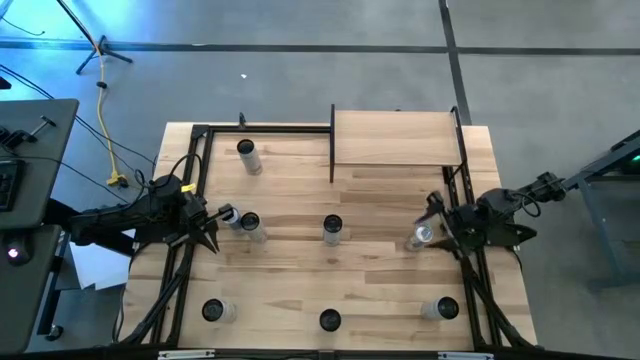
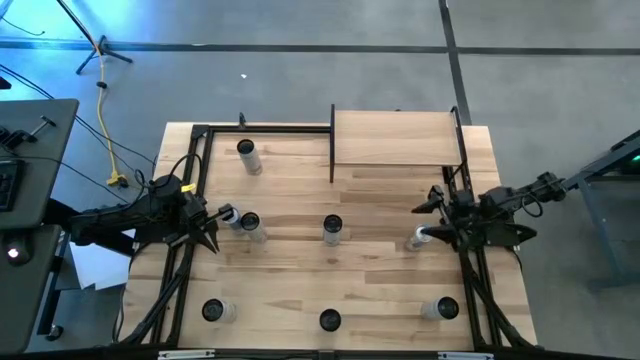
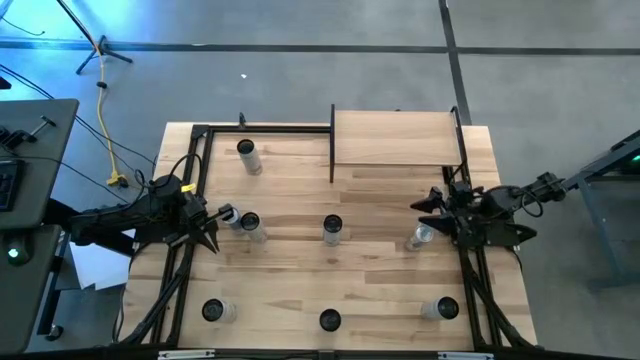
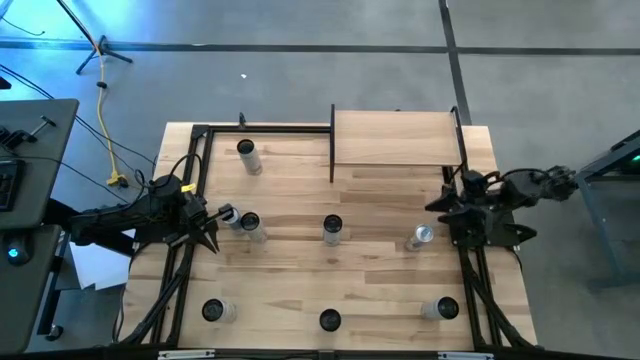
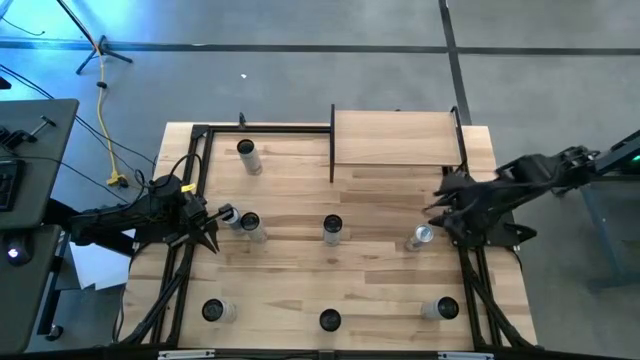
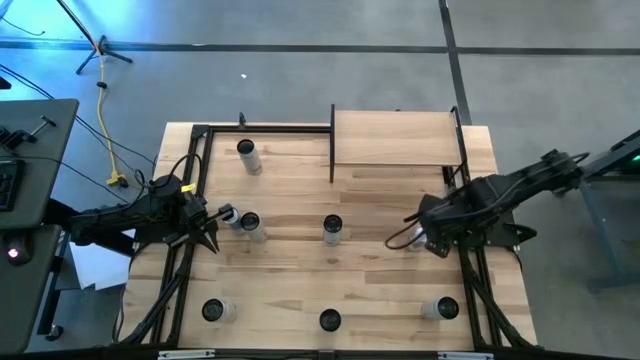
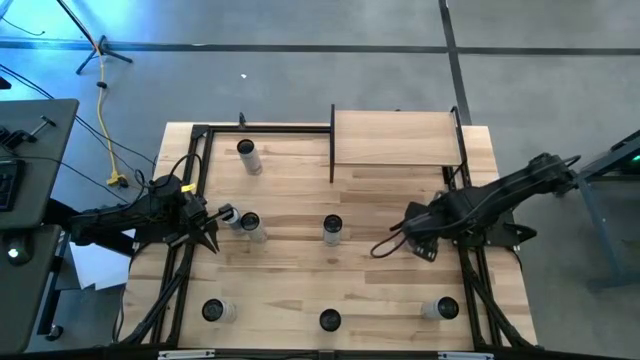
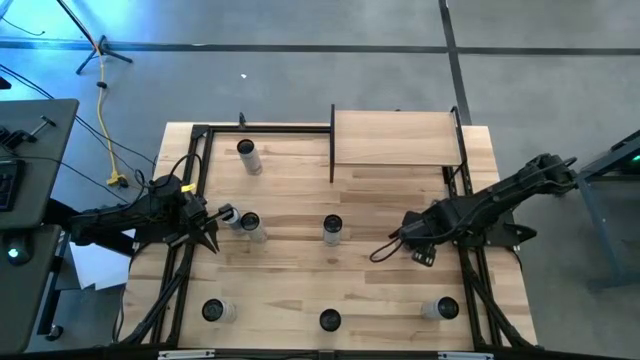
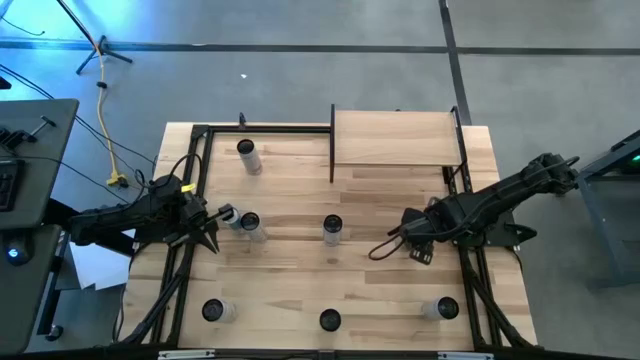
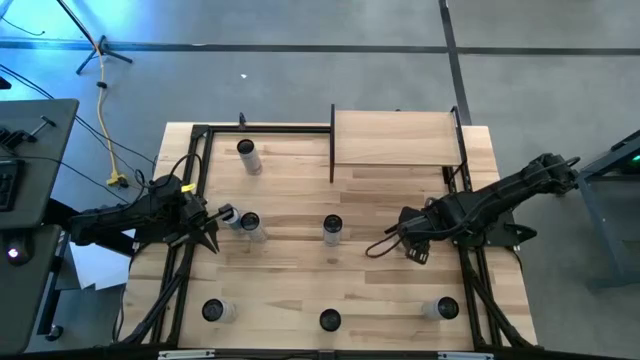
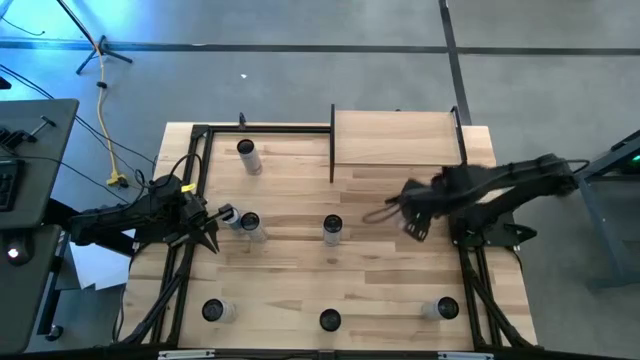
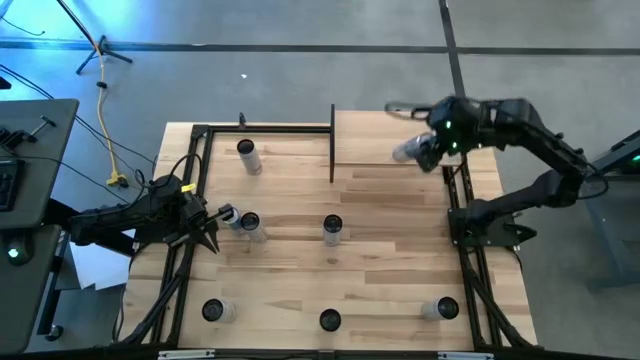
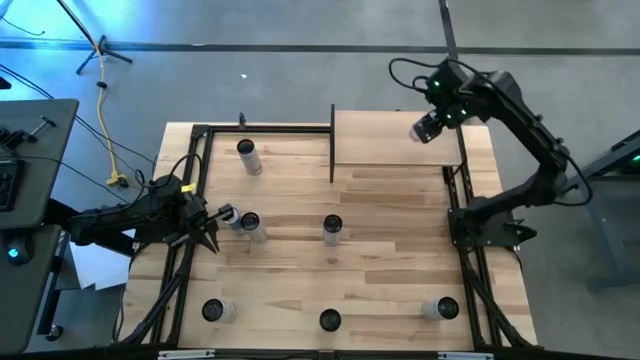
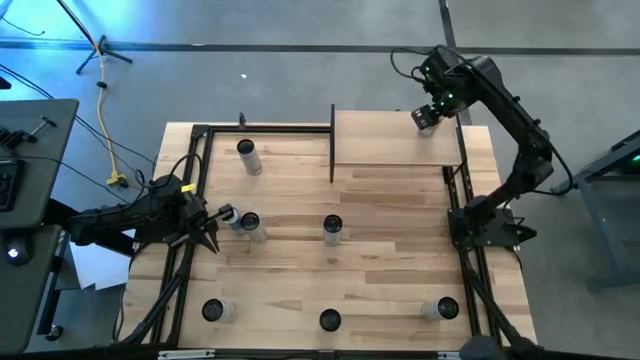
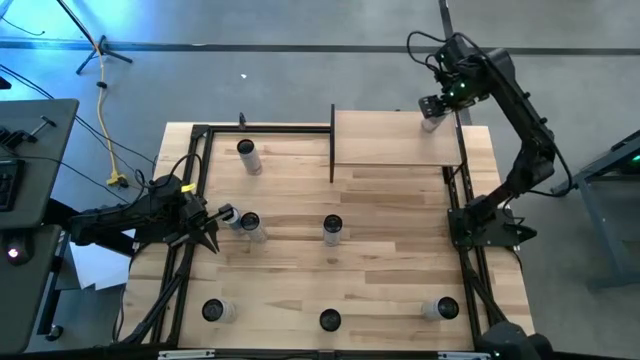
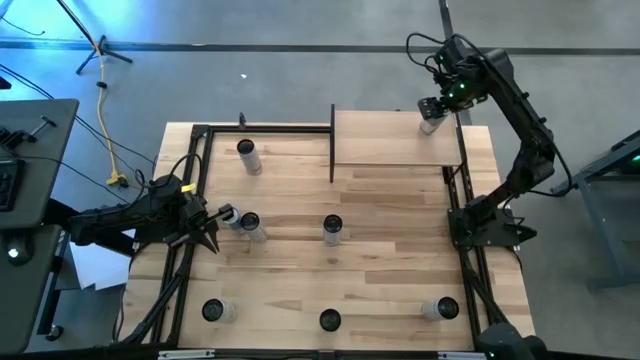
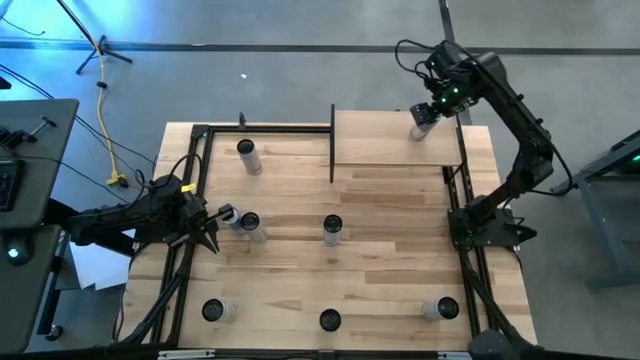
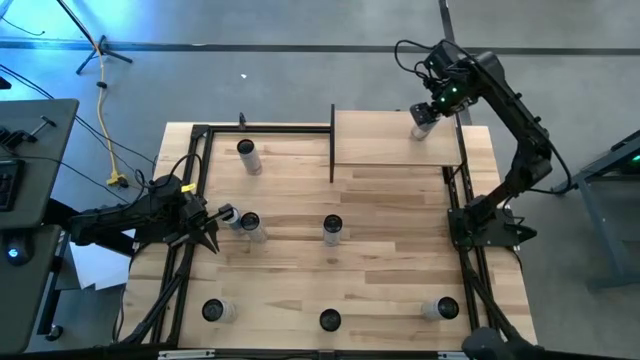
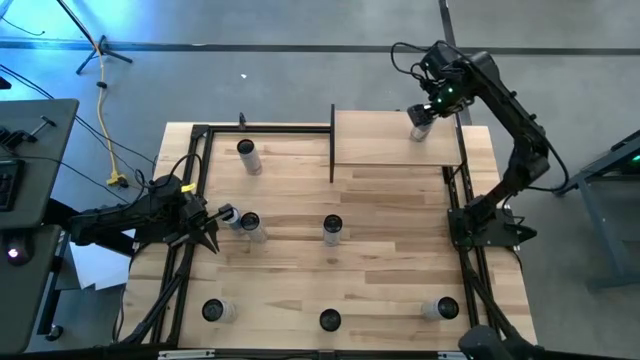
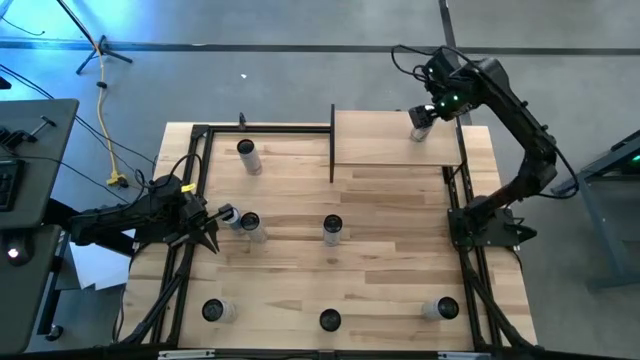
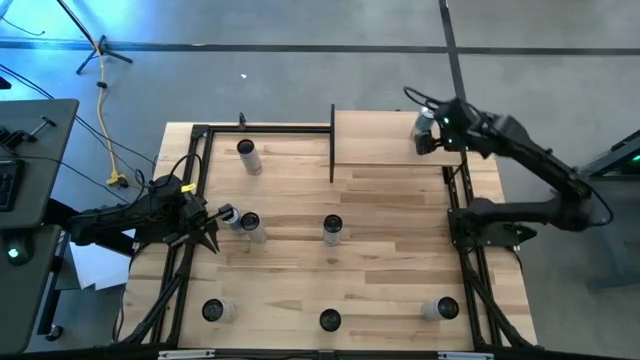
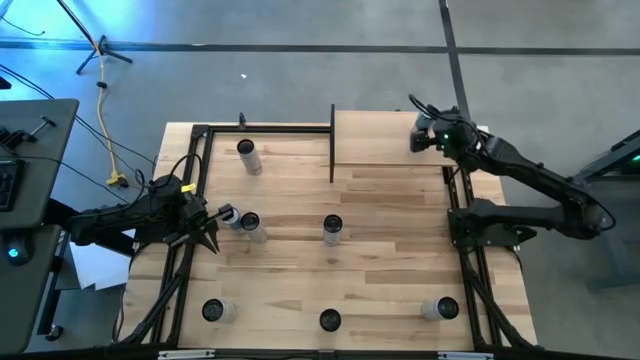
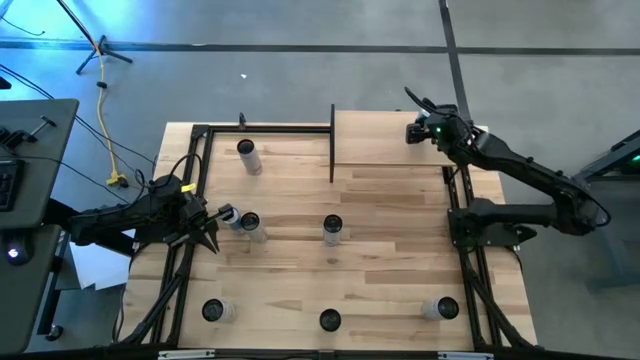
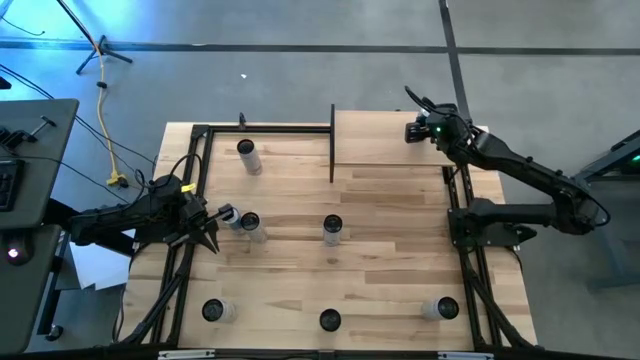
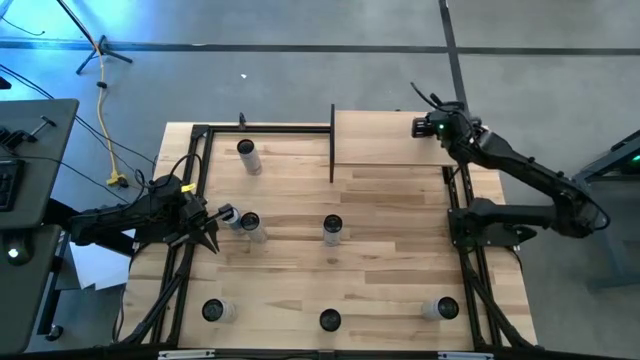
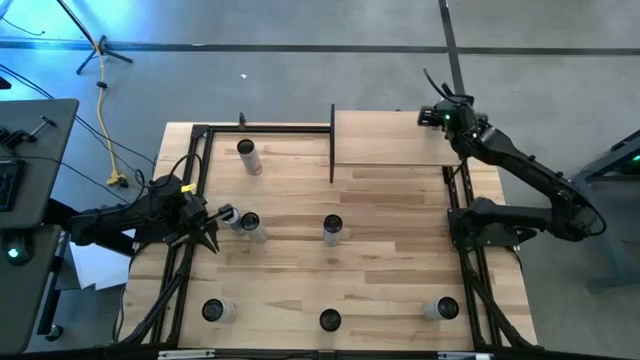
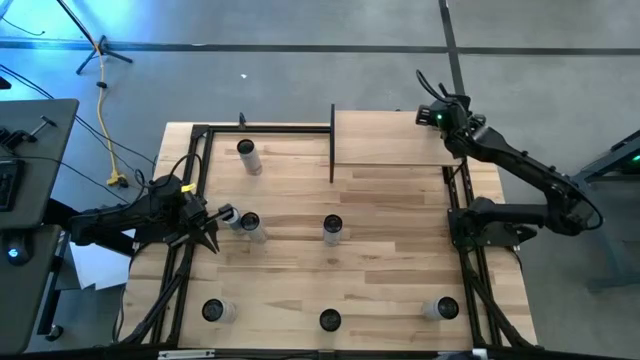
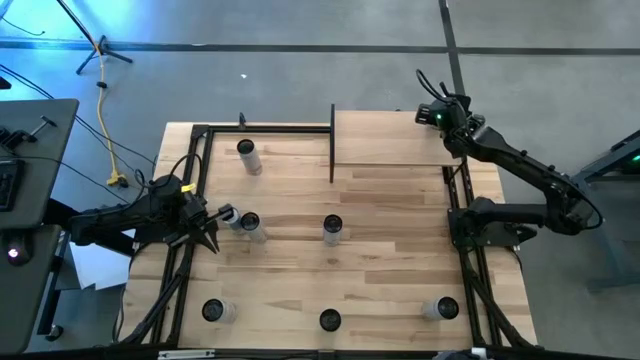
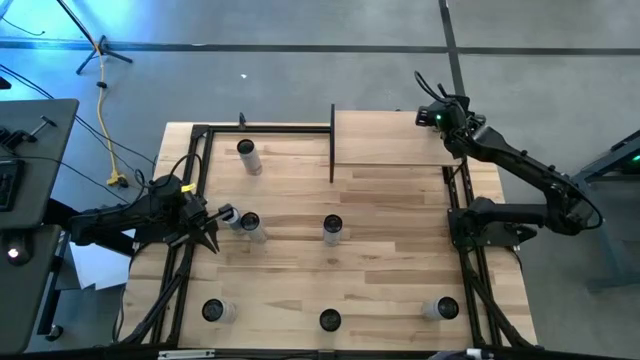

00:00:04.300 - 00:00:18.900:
Task: Place canned beverage on shelf
Put the right blue soda can on the shelf

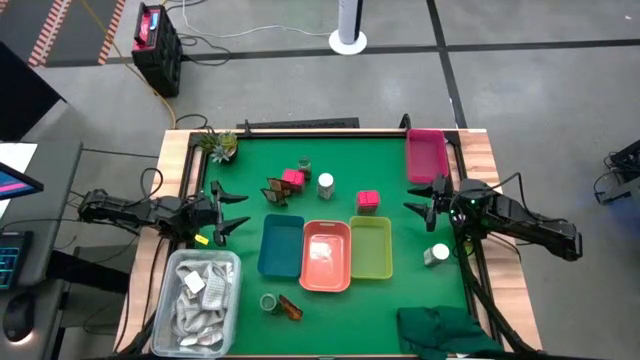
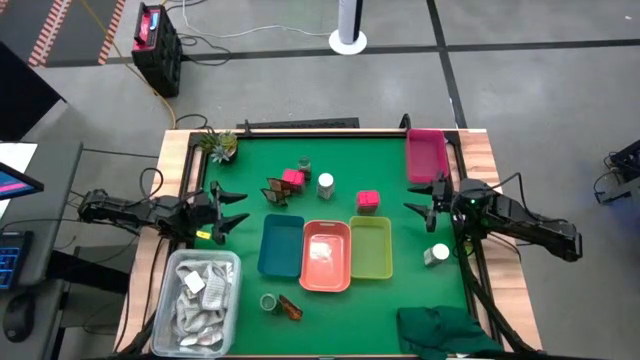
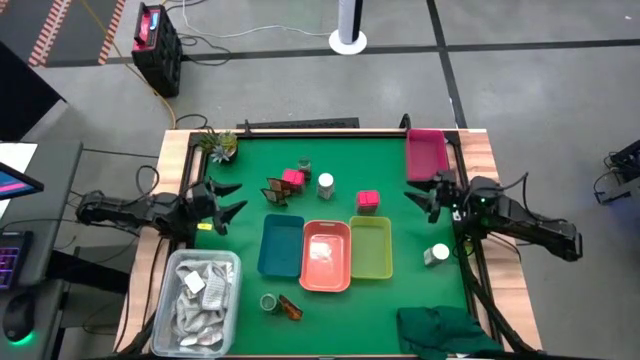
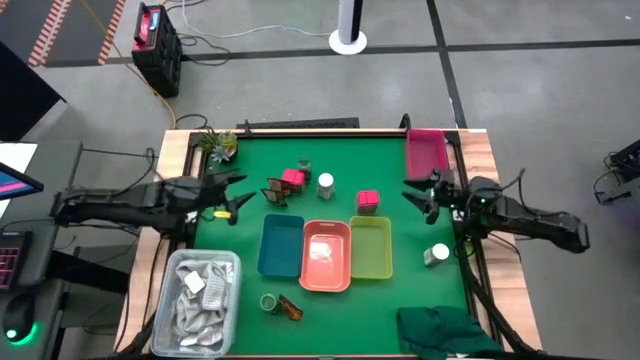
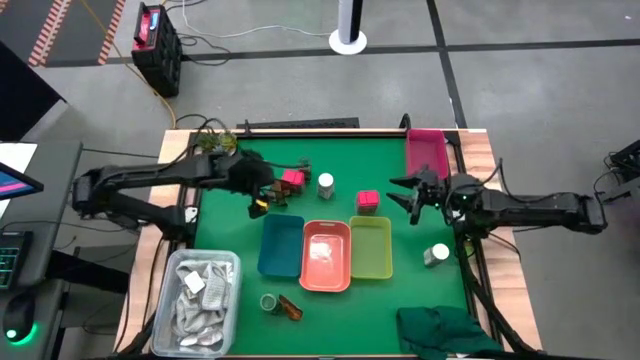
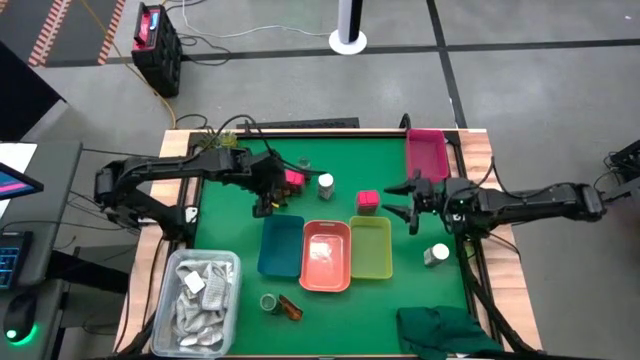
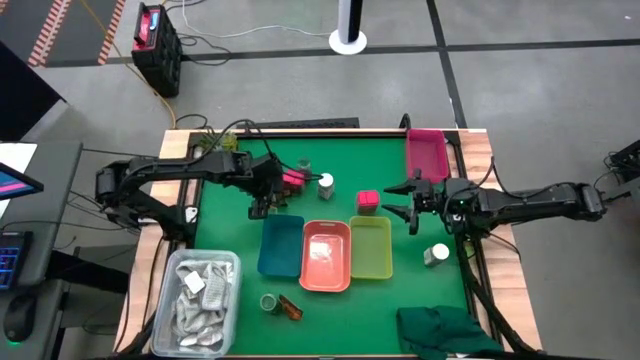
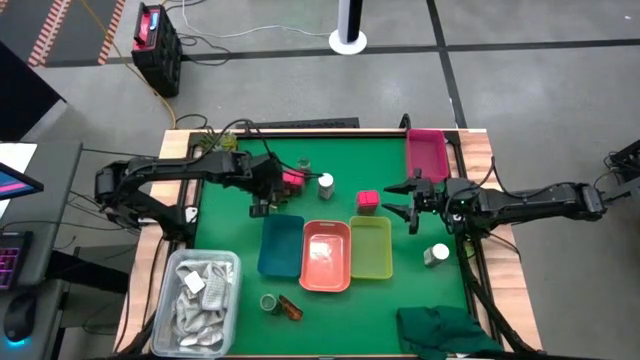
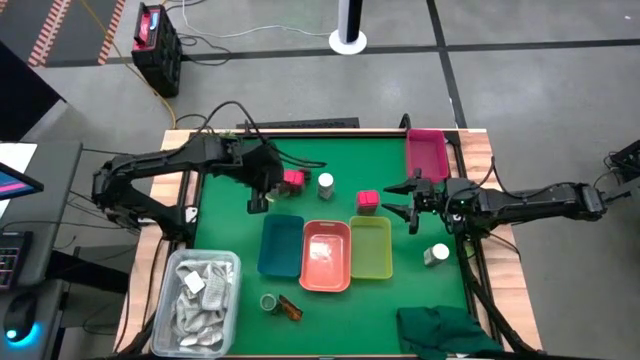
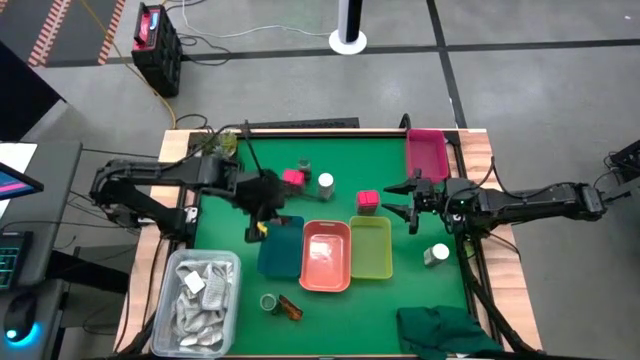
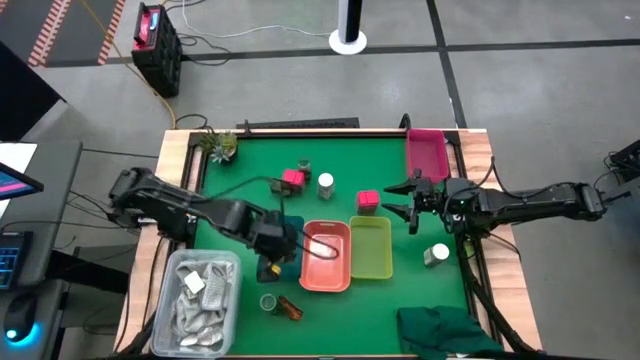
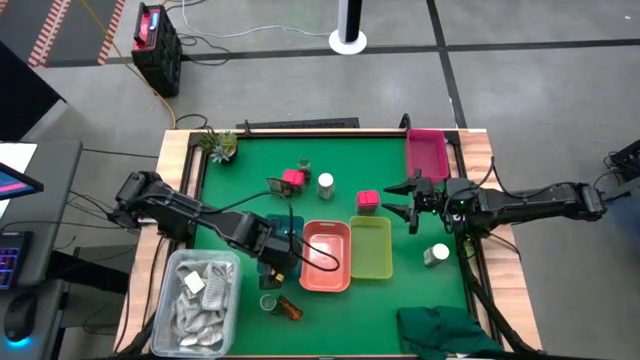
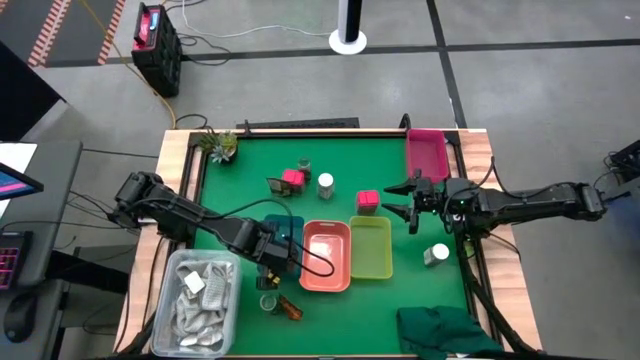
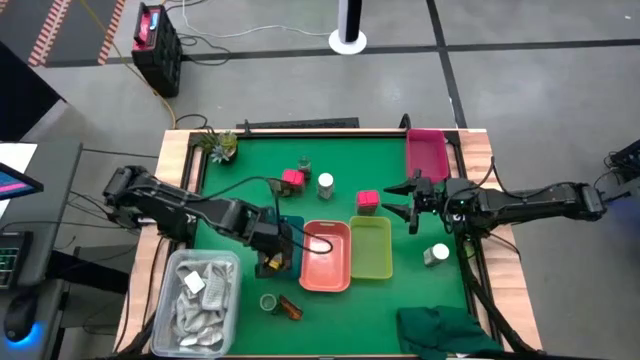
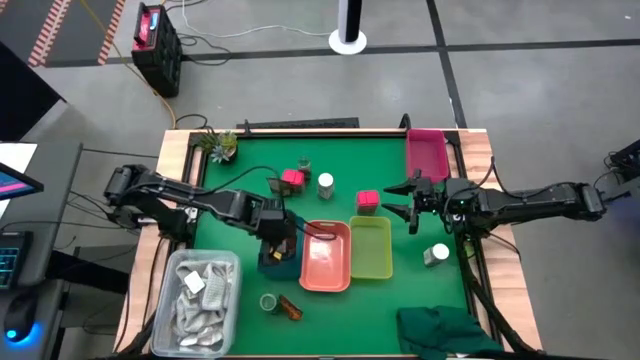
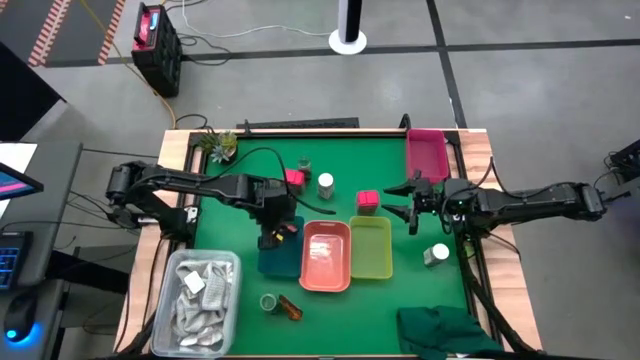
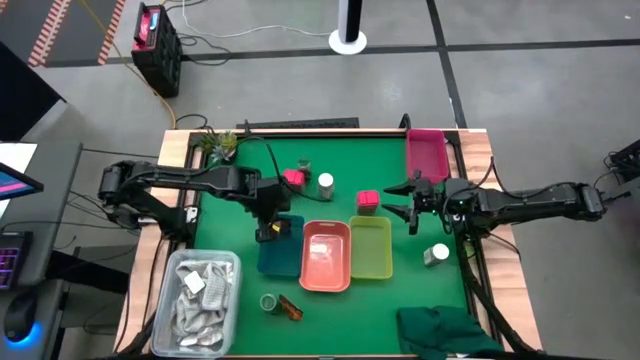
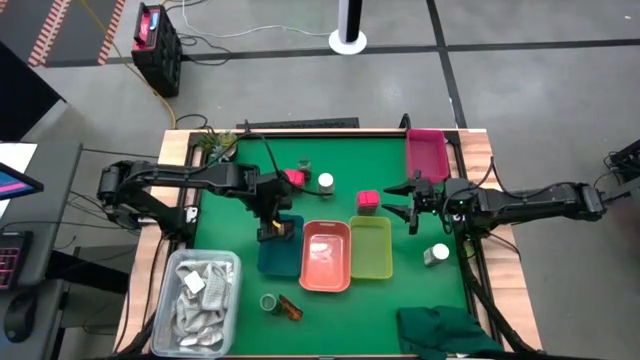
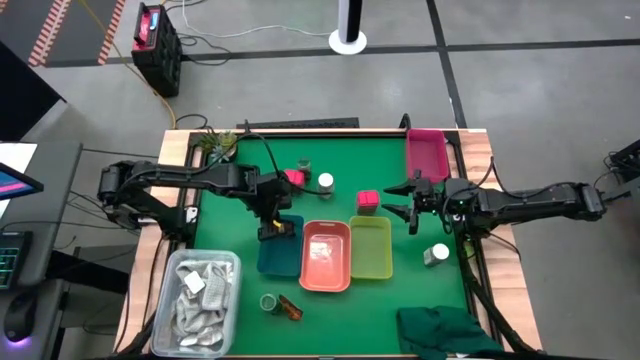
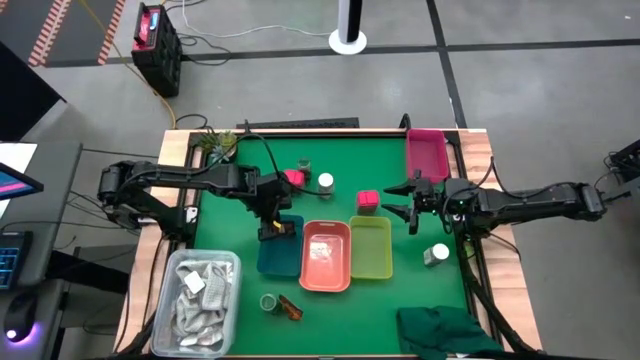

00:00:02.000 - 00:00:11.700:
Task: Sort spices by type
Put the middle orange seasoning pack into the blue bin
